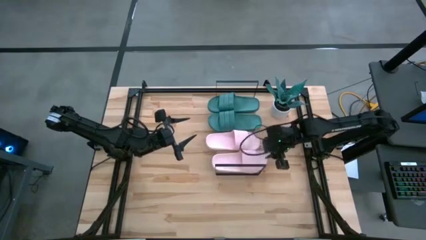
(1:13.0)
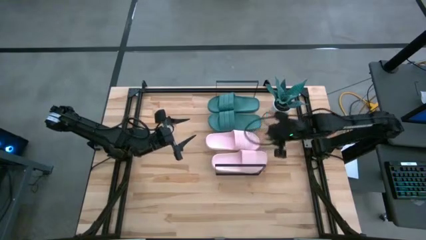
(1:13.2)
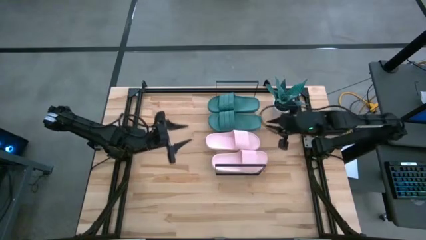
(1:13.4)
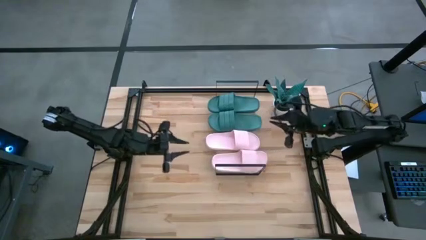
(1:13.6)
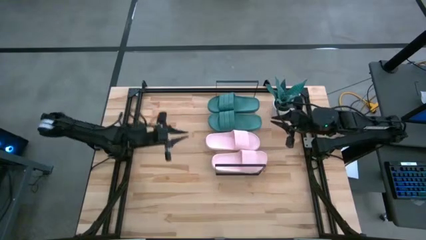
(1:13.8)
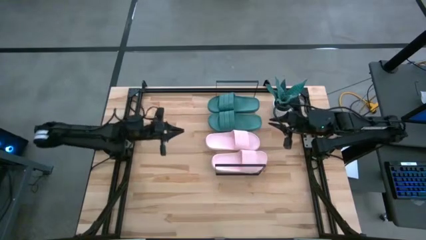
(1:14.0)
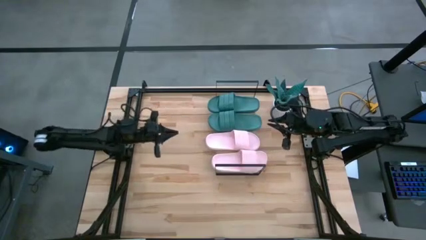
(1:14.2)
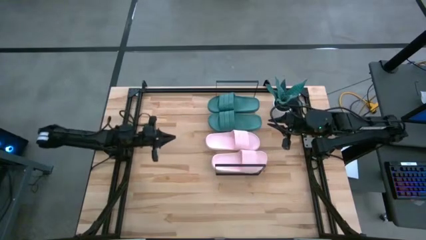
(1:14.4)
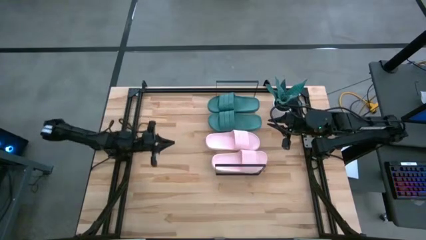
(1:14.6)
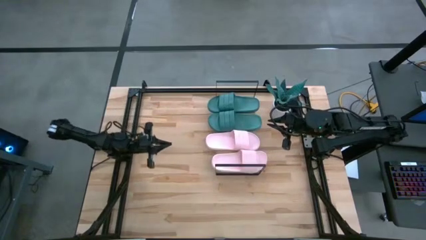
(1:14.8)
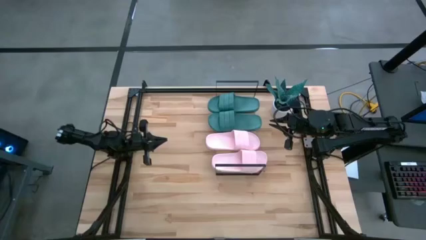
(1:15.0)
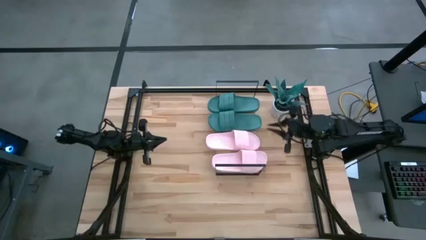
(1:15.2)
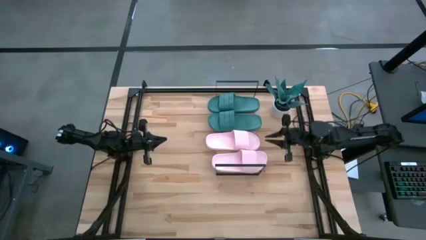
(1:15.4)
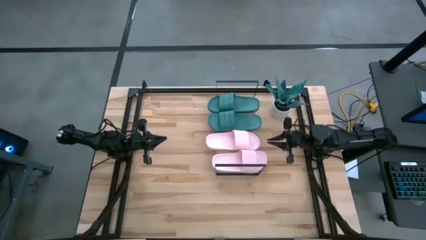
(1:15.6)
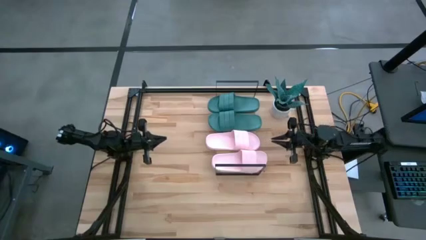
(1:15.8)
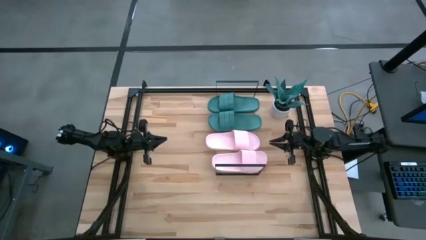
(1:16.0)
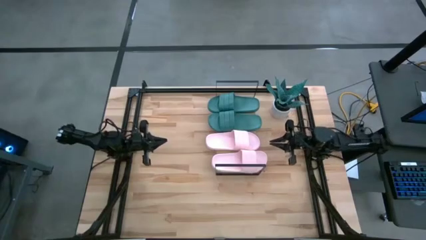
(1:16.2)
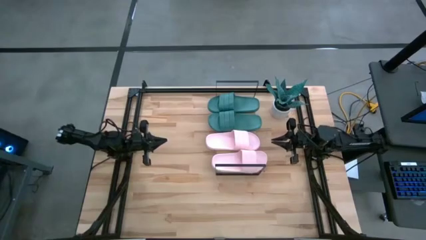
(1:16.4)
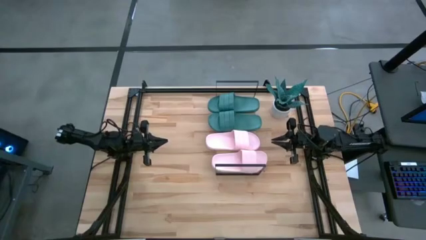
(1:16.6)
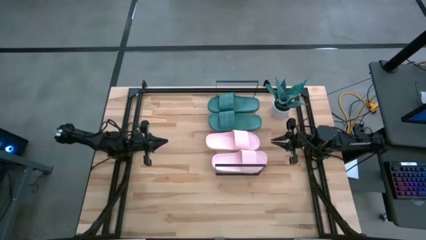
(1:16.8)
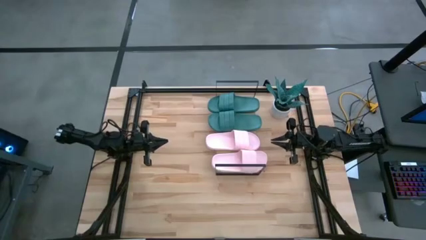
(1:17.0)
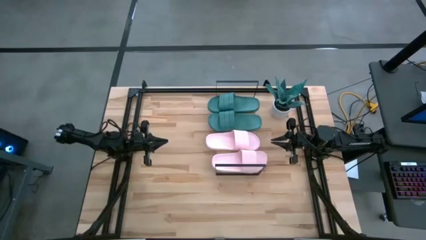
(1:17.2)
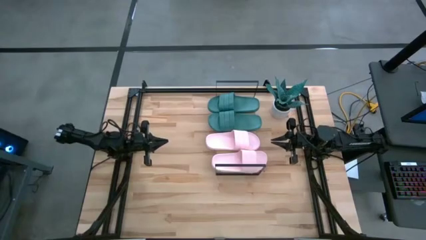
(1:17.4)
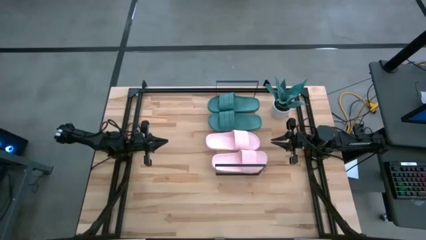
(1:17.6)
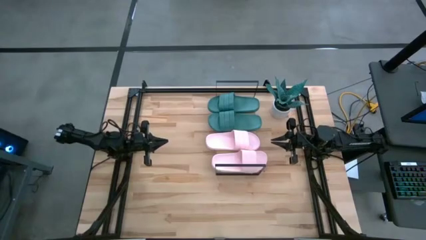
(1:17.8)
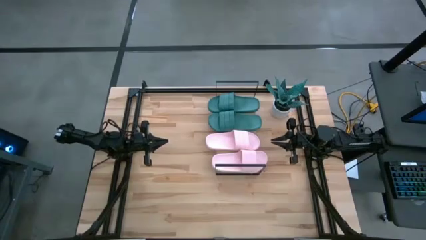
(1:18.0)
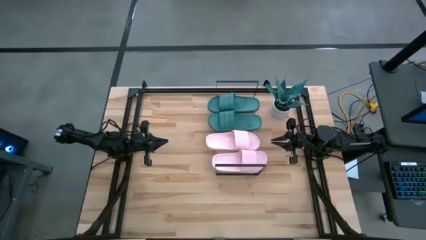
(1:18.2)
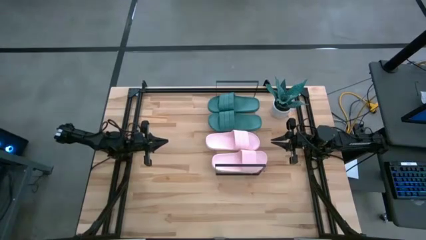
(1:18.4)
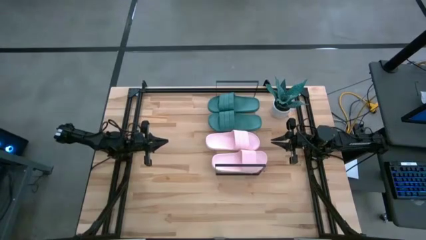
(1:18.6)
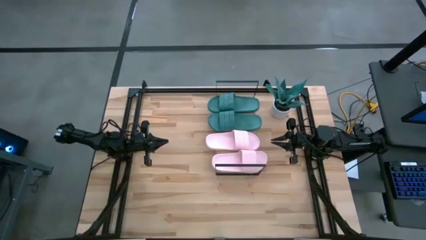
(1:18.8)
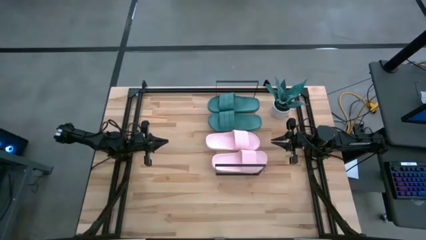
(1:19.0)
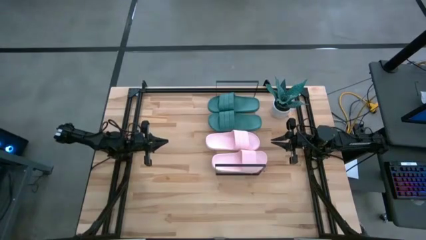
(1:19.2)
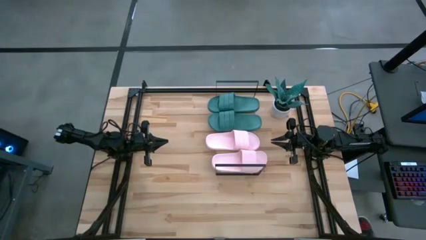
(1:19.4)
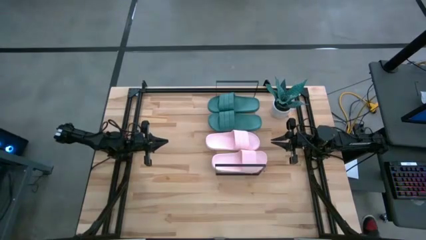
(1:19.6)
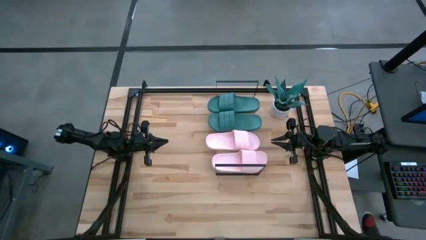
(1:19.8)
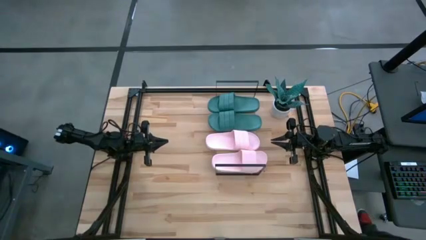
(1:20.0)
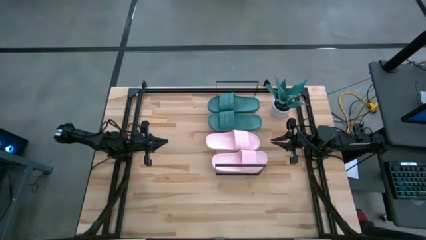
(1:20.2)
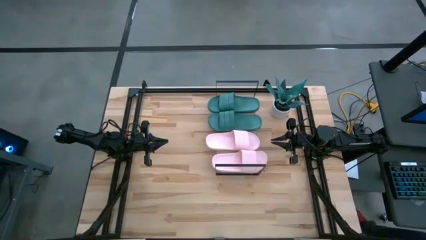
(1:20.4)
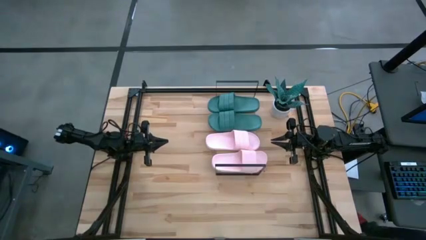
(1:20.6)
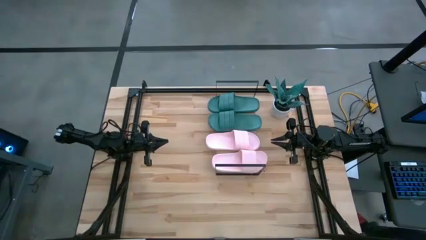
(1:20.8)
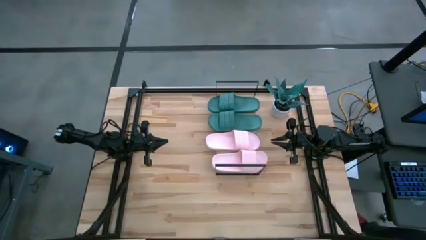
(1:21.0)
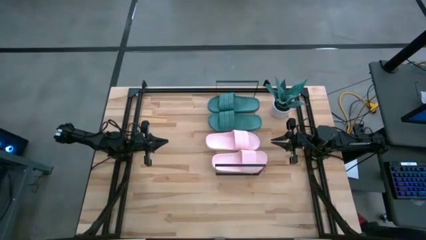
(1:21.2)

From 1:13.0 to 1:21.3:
Task: Pick and place slides into the shelf
Return to Home Position

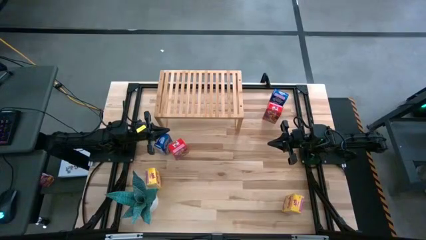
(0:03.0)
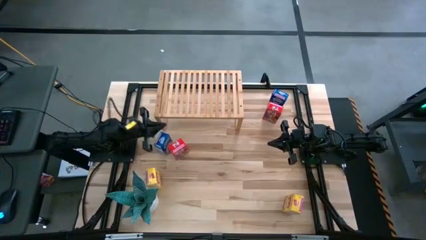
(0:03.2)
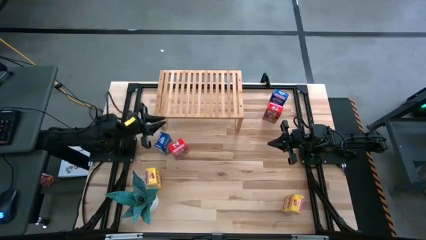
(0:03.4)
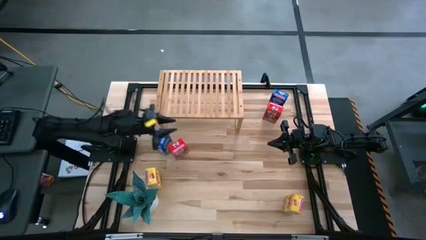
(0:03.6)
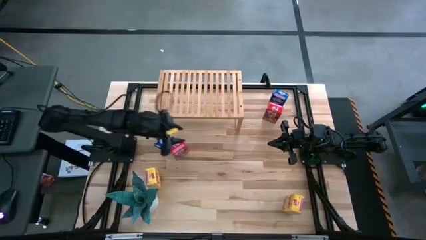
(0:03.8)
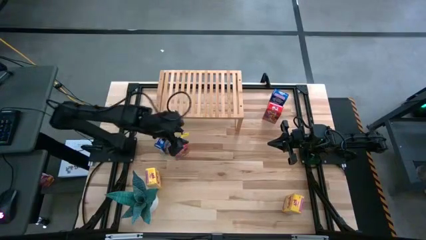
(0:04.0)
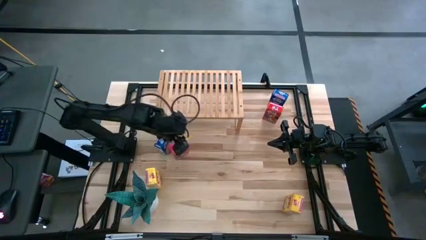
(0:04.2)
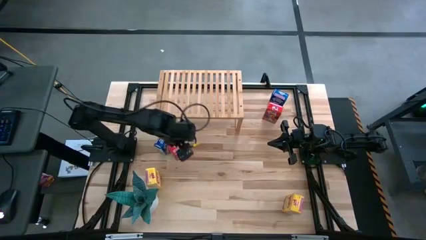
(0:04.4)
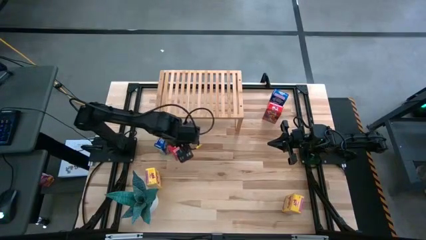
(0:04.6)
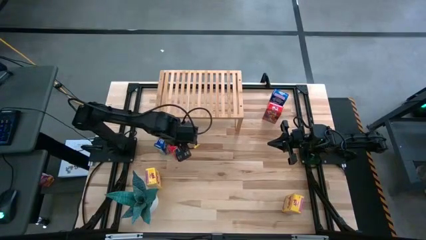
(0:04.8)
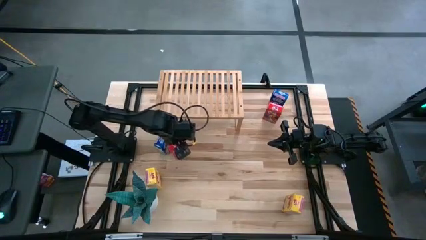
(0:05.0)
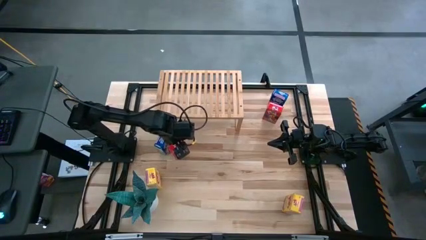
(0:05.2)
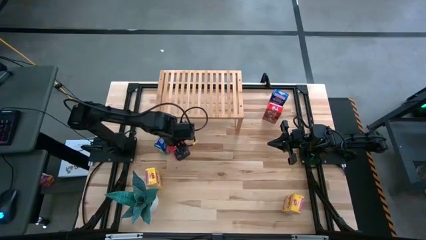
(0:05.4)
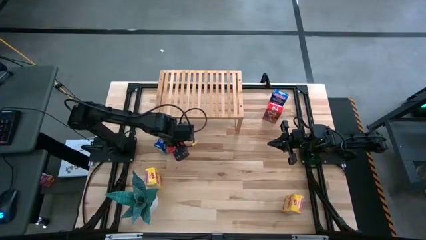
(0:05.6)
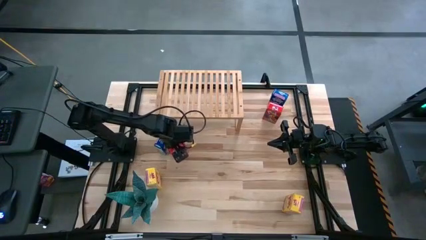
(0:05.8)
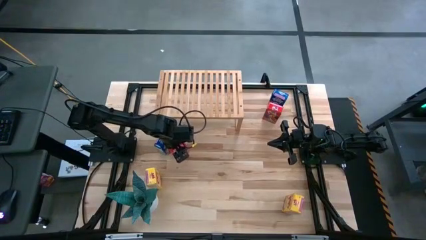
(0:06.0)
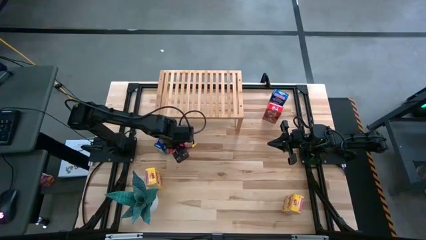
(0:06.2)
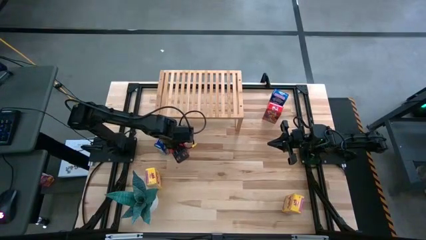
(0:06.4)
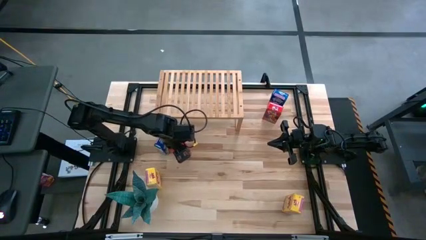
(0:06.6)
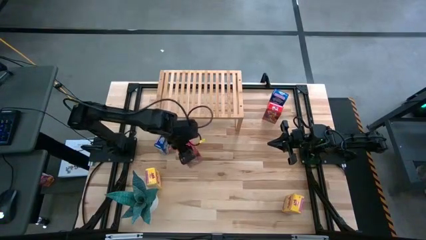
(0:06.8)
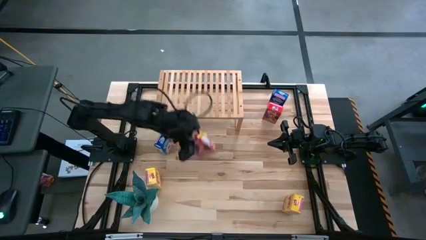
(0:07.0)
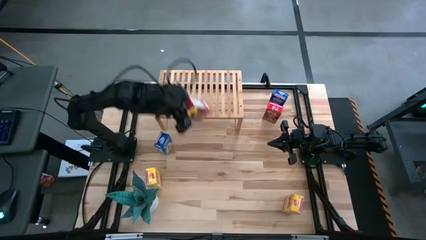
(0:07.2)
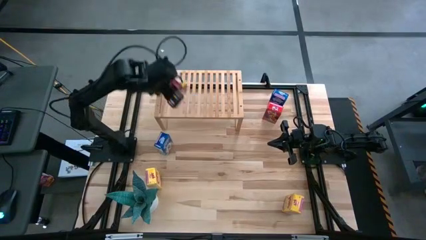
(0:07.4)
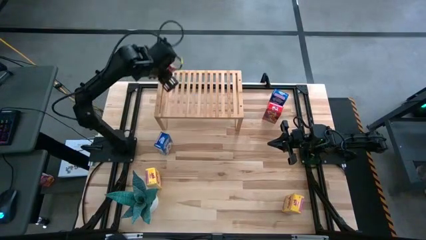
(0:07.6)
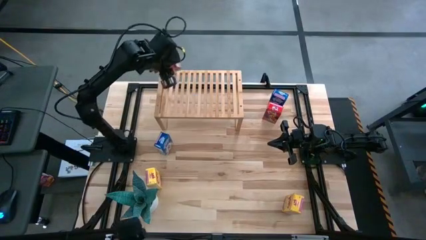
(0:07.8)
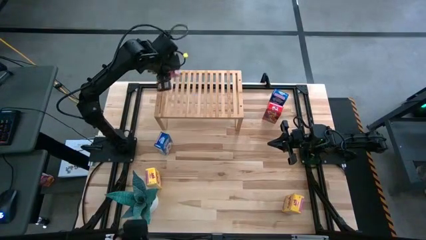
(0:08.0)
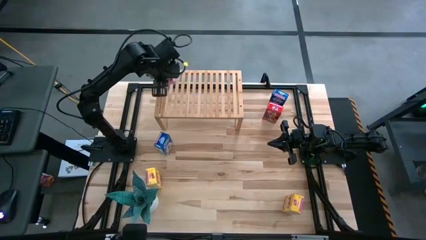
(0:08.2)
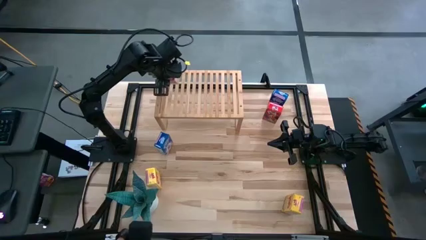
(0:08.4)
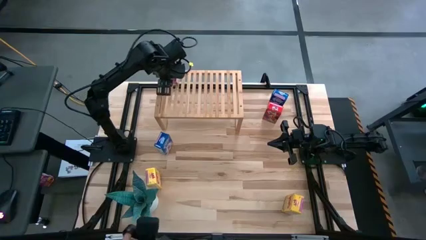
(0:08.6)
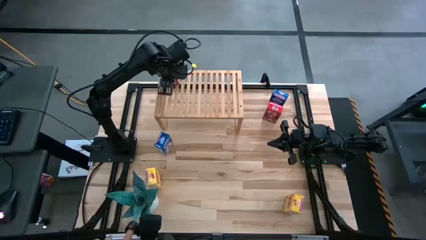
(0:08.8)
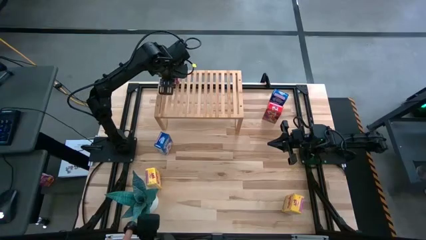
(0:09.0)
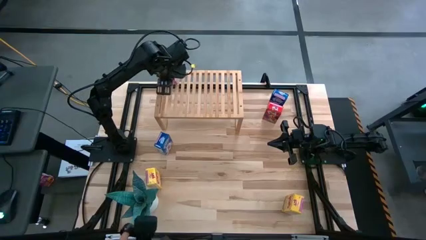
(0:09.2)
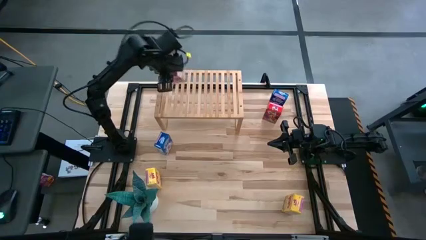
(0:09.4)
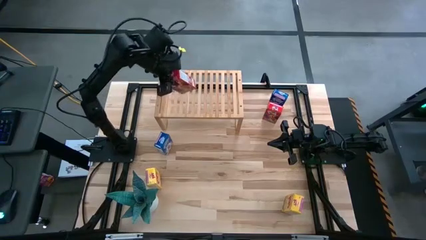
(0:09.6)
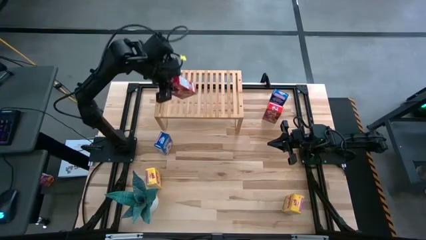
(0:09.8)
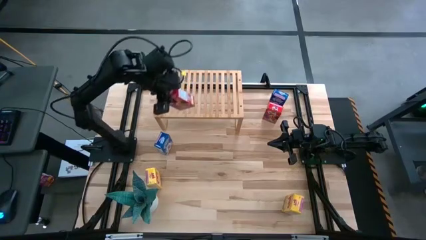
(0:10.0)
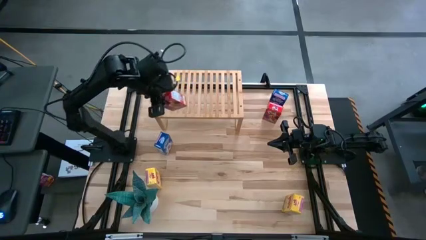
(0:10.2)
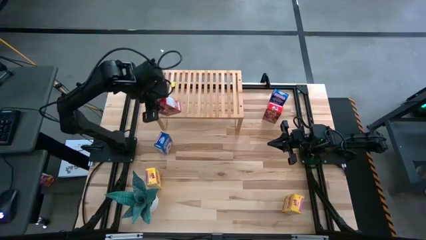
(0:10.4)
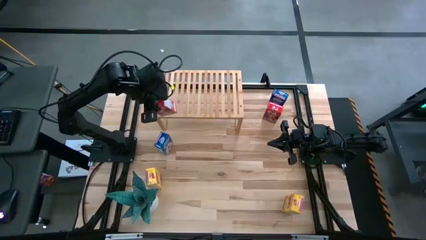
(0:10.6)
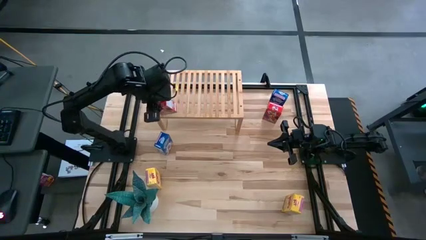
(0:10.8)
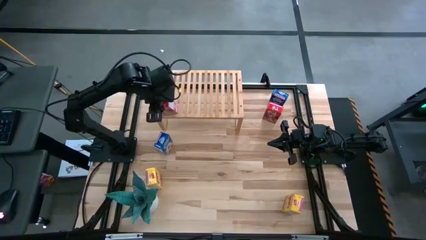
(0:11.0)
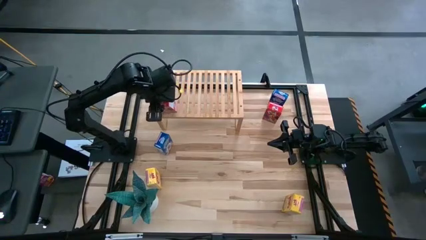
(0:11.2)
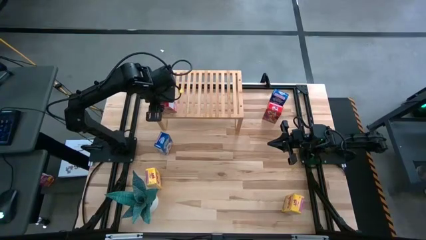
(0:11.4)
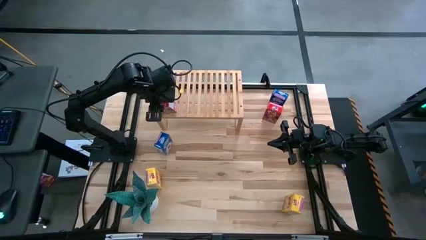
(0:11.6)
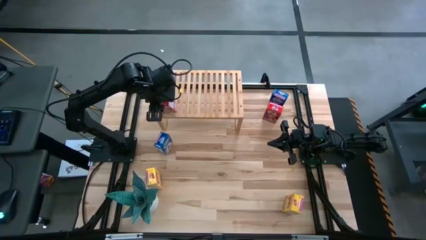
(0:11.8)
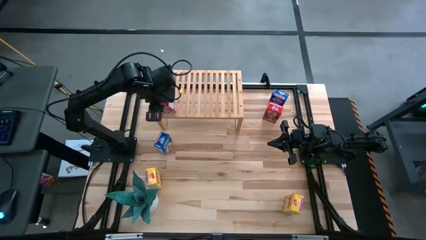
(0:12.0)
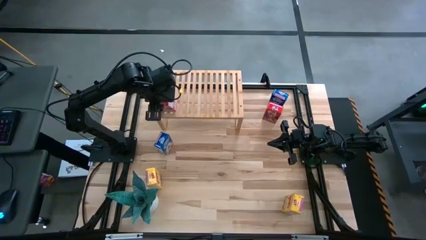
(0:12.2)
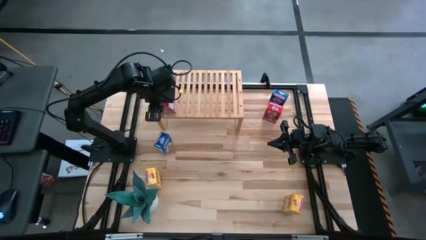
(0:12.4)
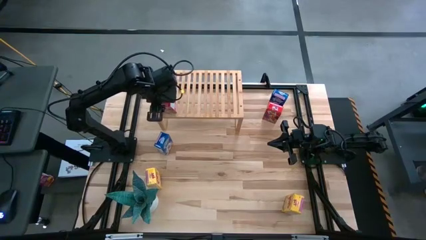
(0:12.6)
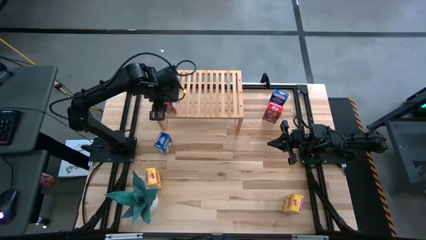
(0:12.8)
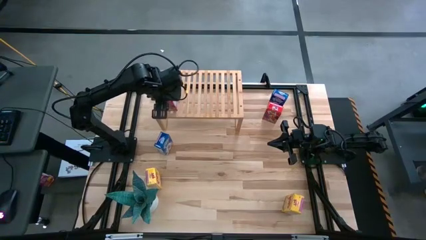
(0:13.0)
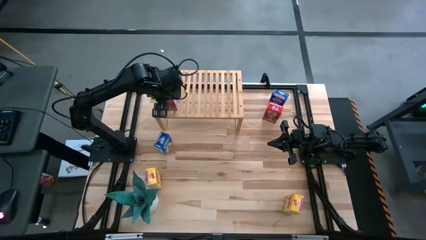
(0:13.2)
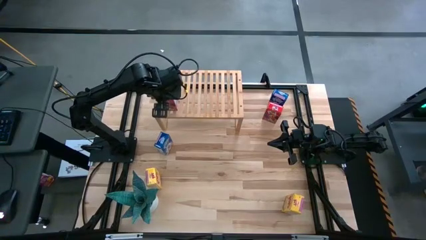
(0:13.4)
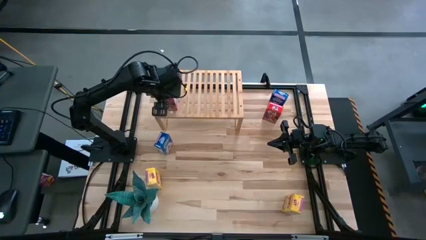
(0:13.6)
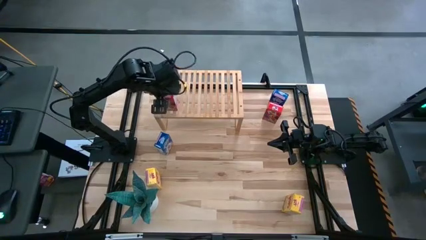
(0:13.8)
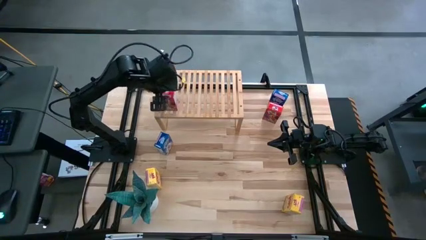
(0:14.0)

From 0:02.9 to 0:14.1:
Task: Stack cereal on shelf
Put the left red cereal box on the shelf
